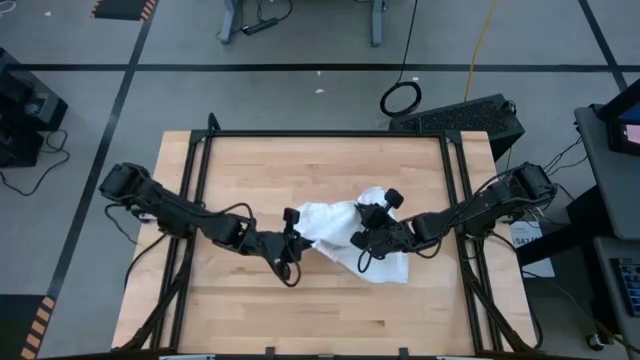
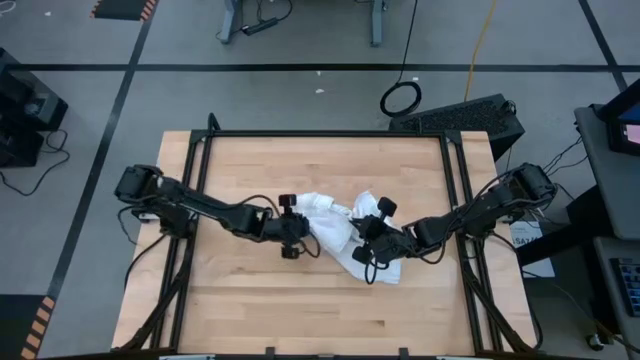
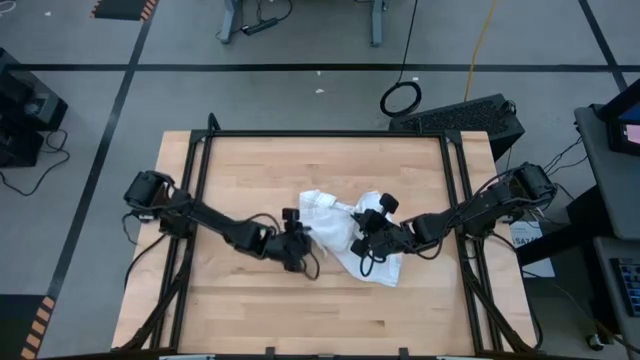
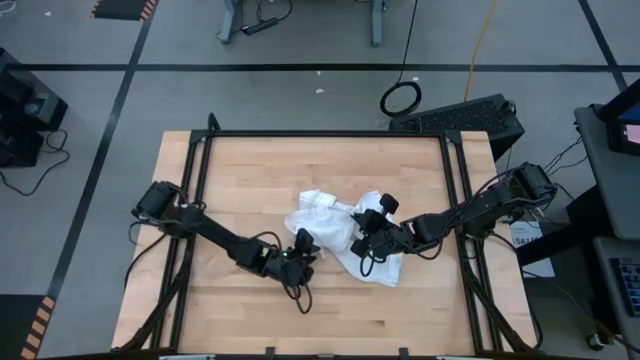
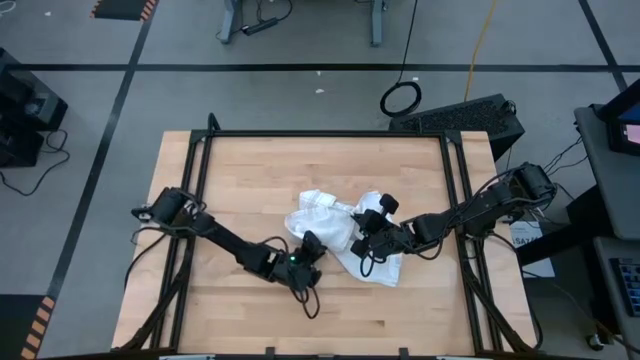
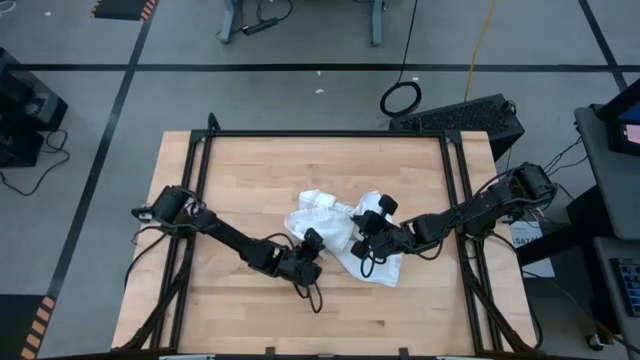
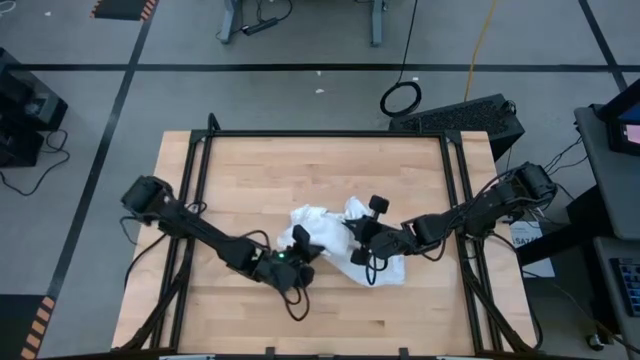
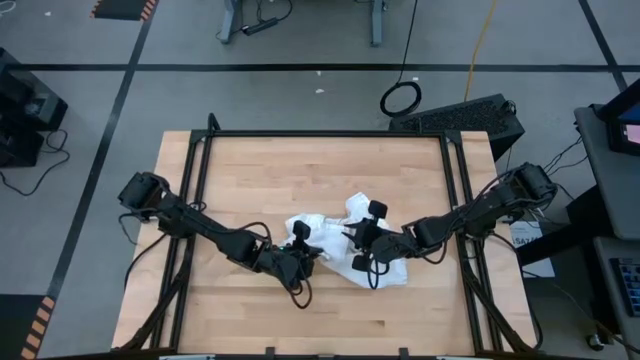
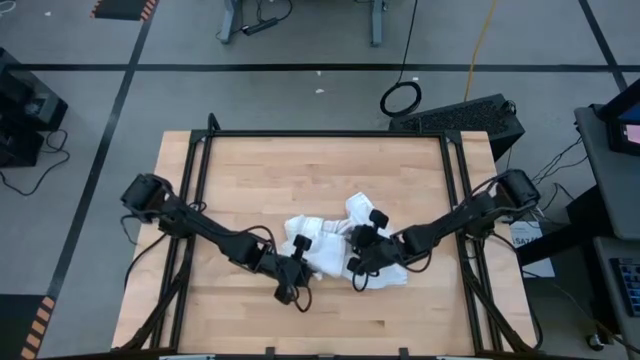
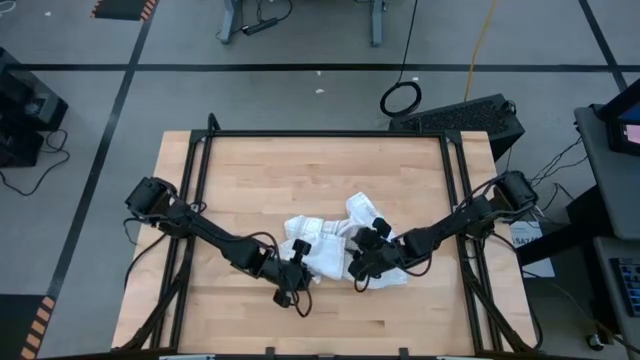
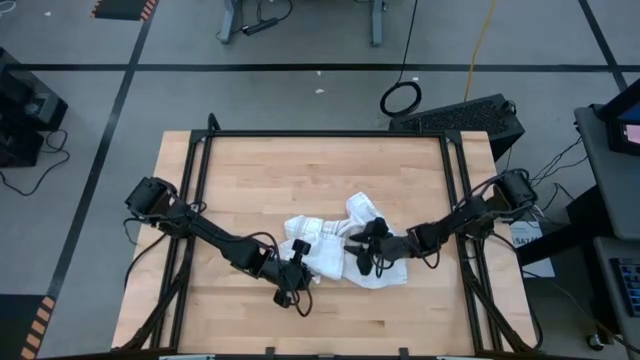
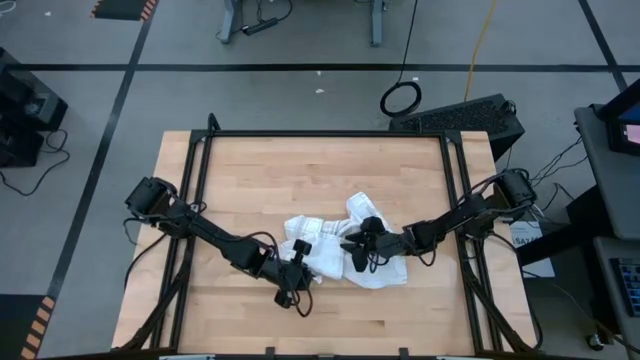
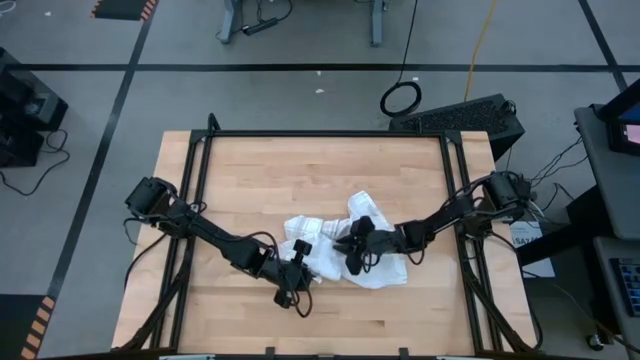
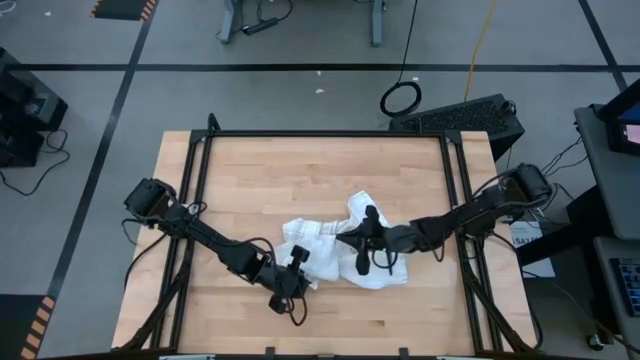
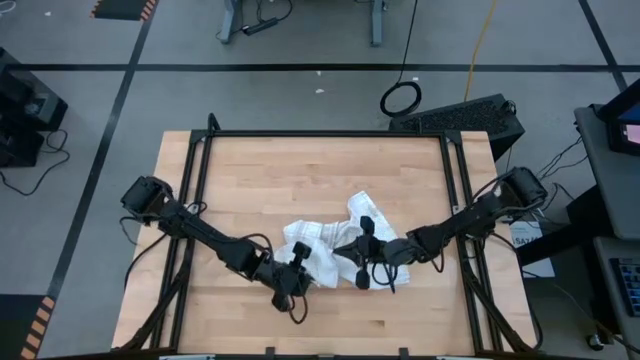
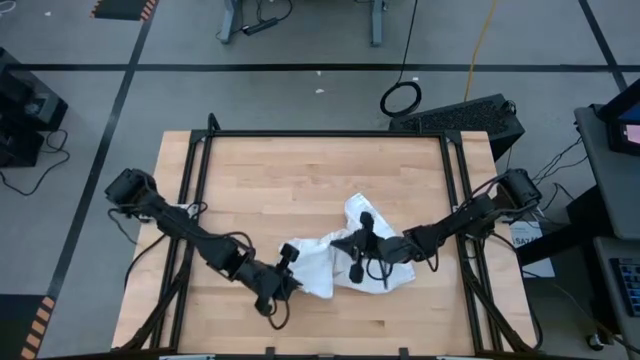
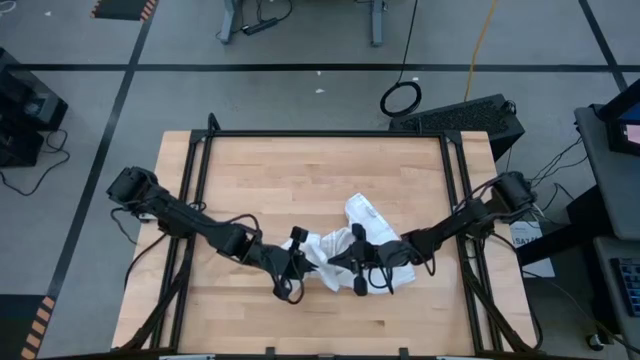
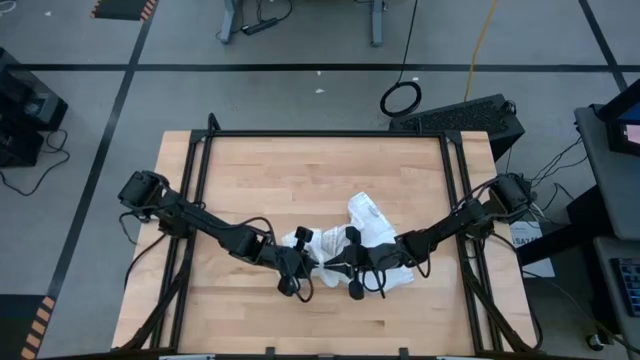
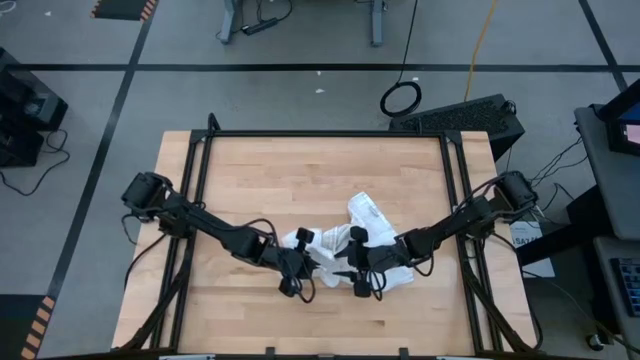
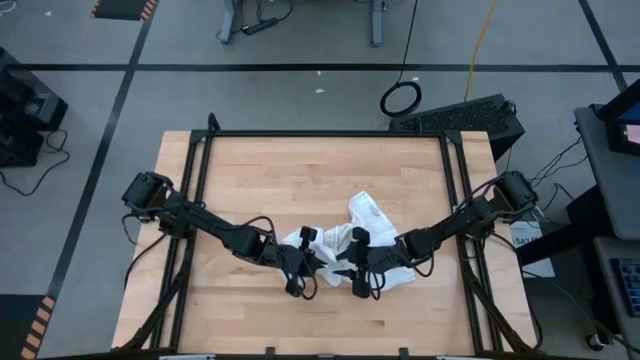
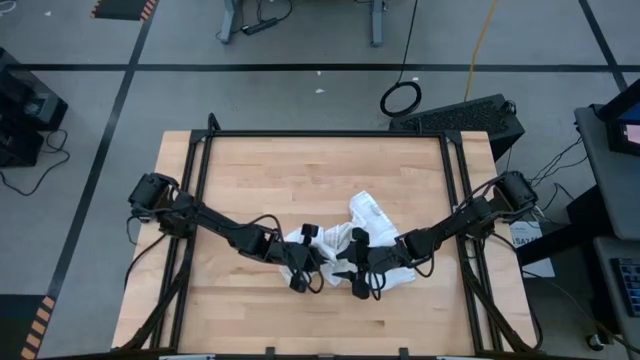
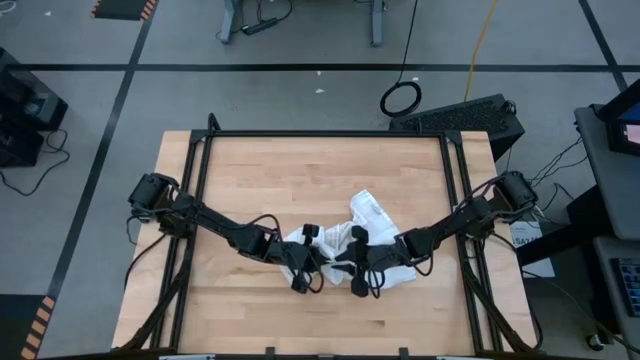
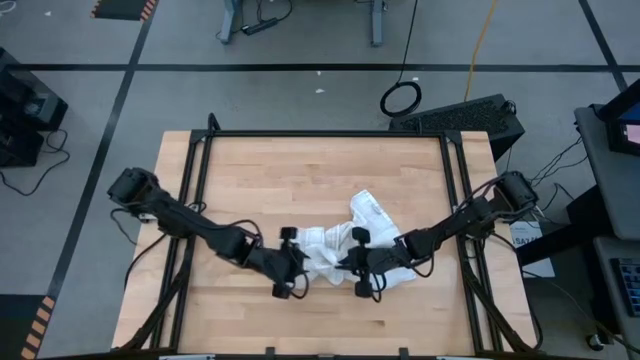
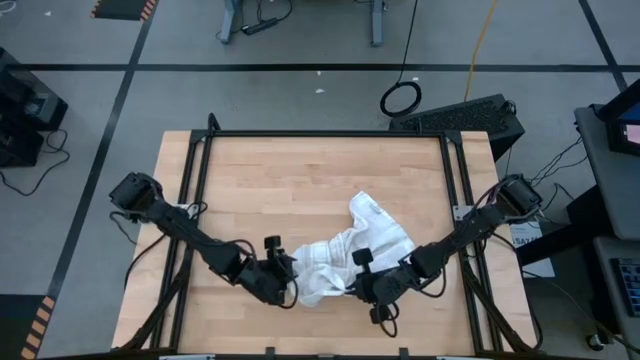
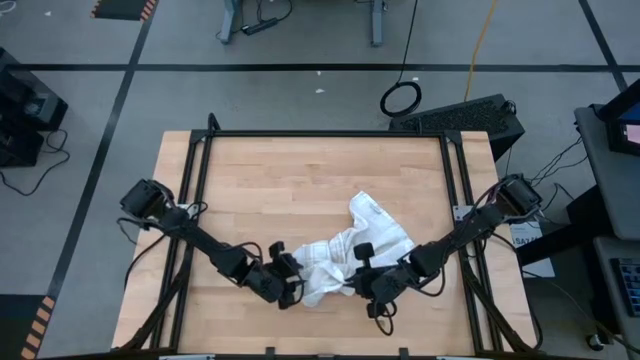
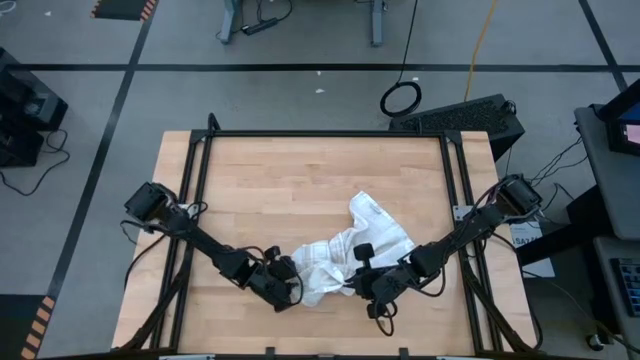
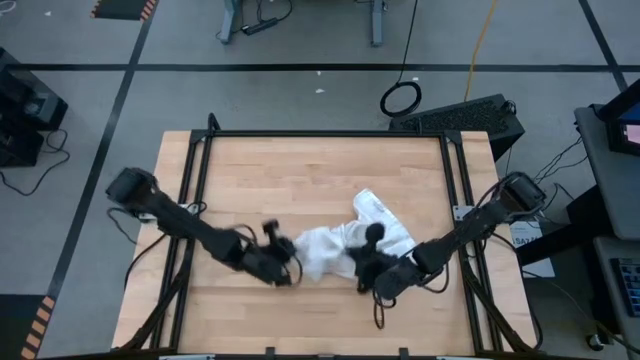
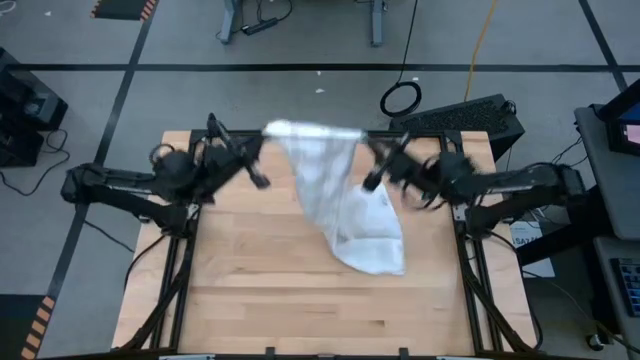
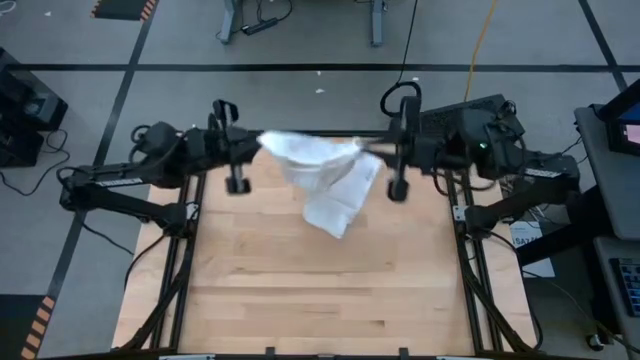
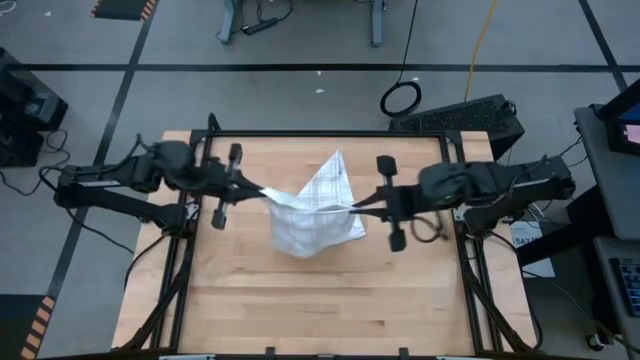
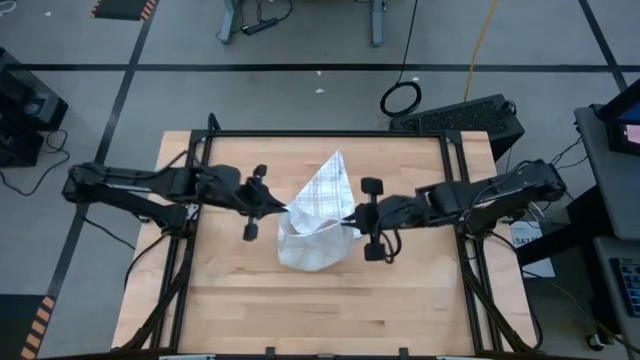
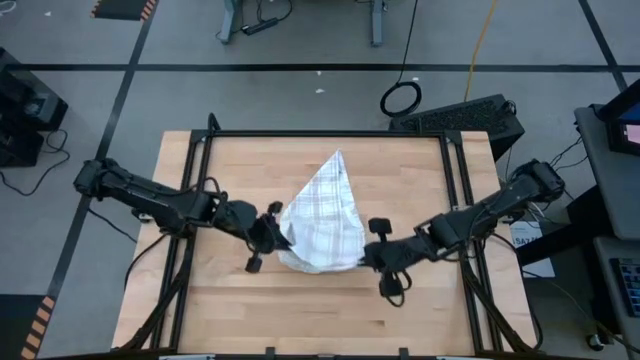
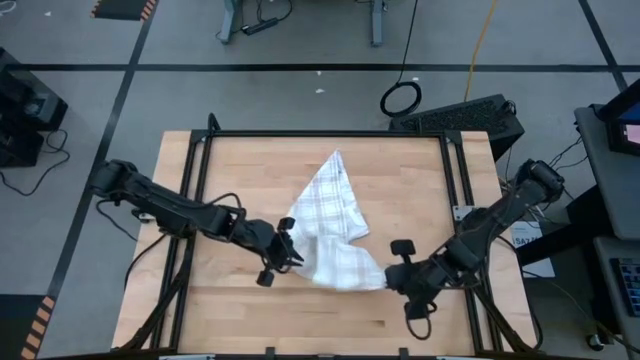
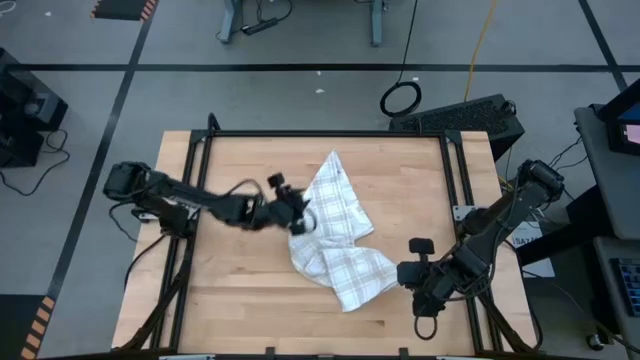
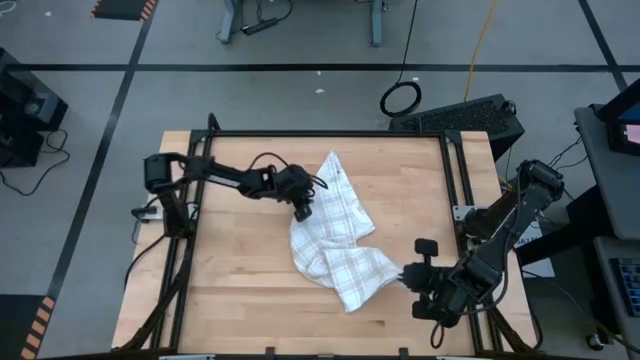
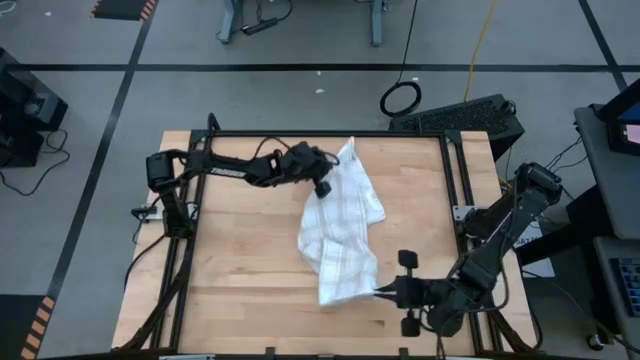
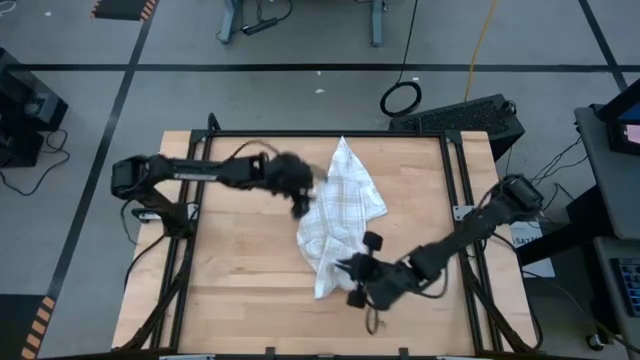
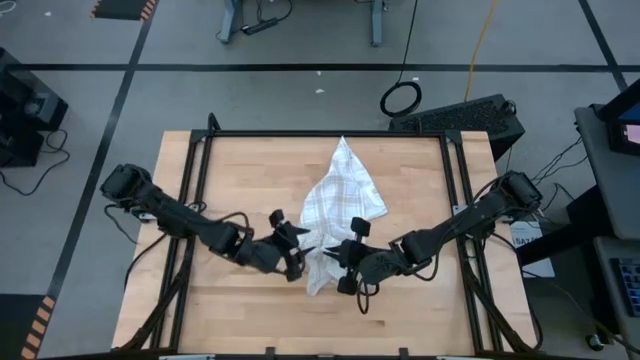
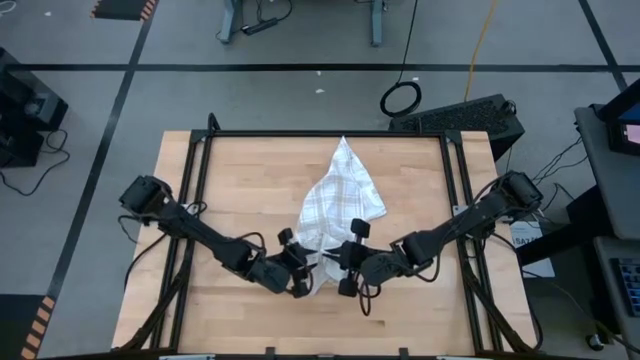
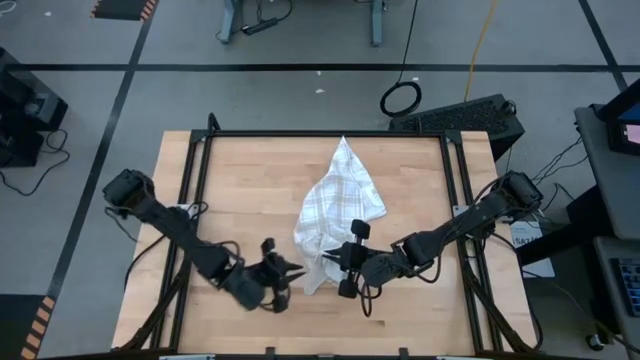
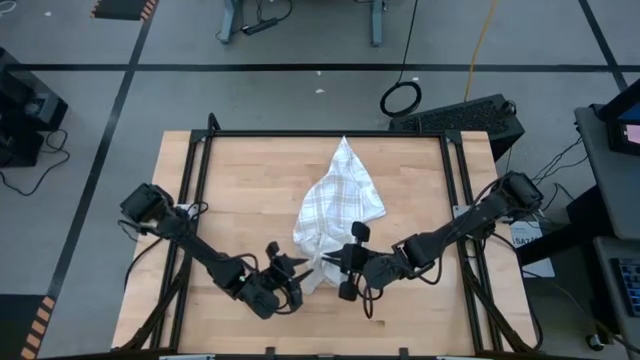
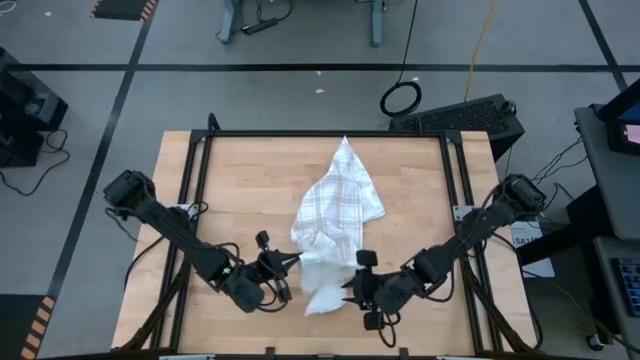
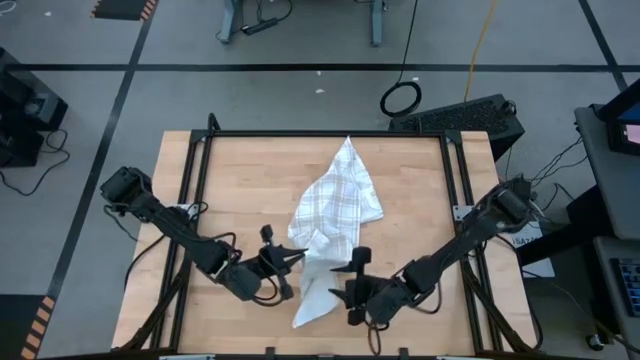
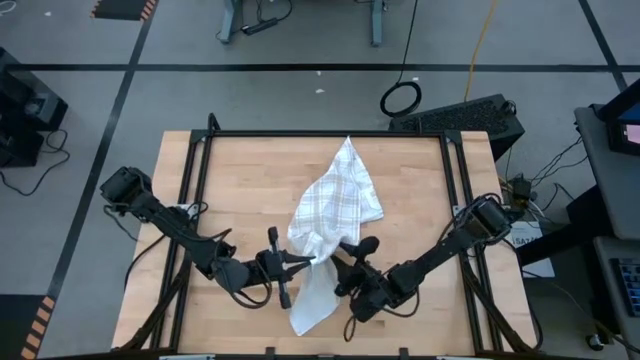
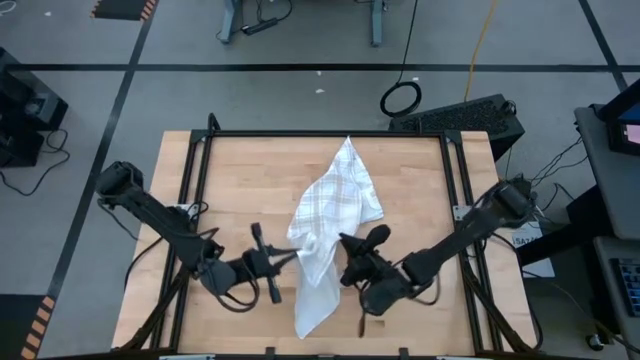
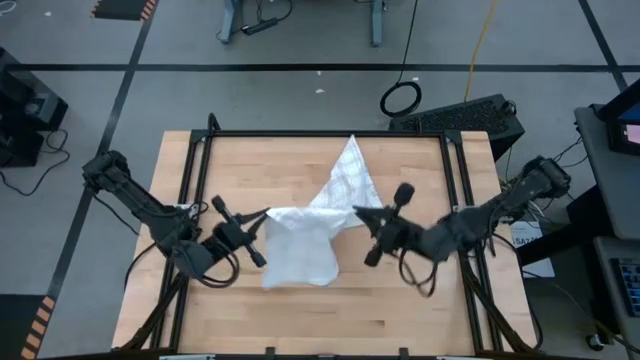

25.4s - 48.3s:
Task: Roll towel
Roll the towel
